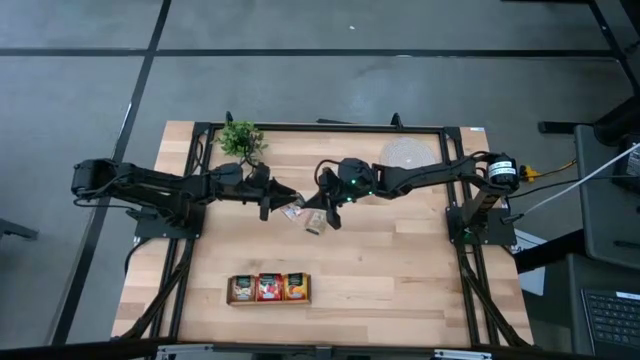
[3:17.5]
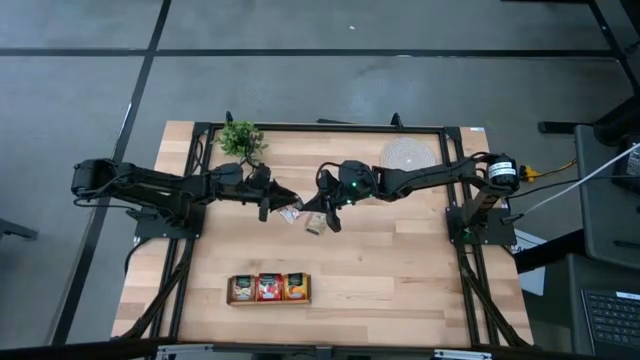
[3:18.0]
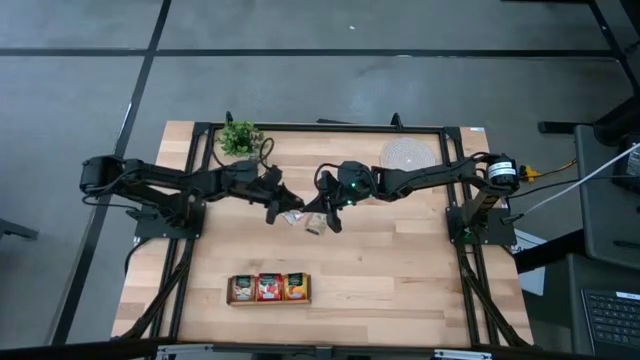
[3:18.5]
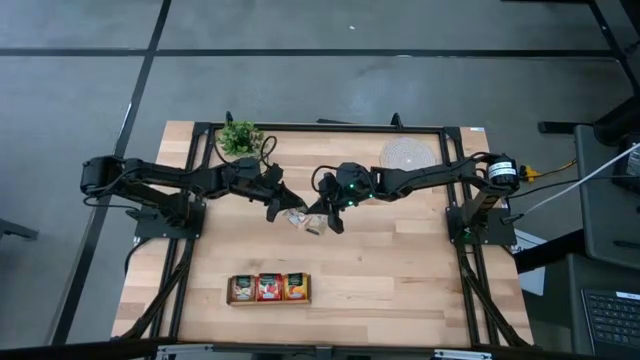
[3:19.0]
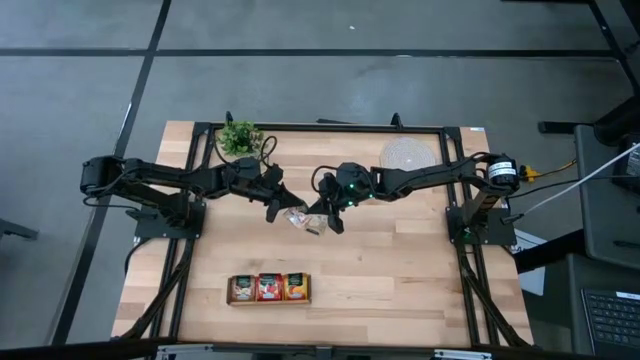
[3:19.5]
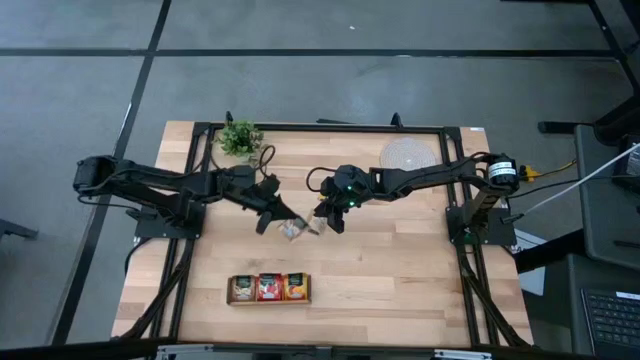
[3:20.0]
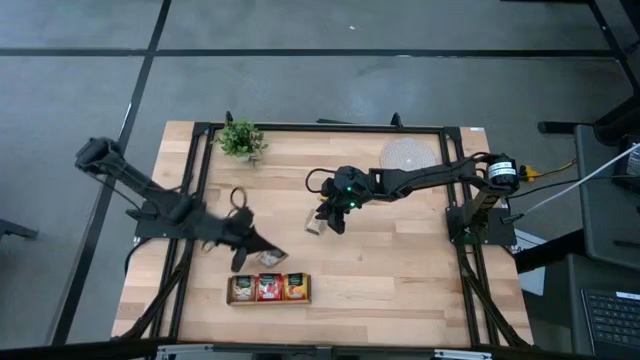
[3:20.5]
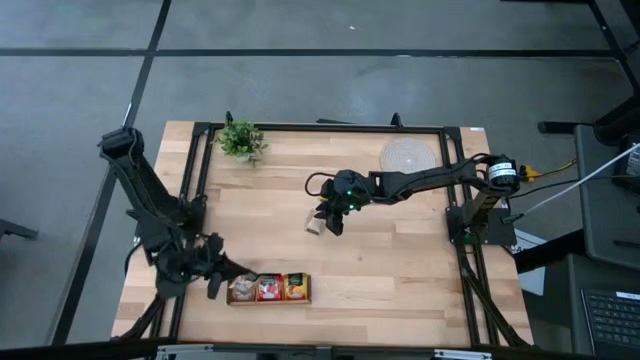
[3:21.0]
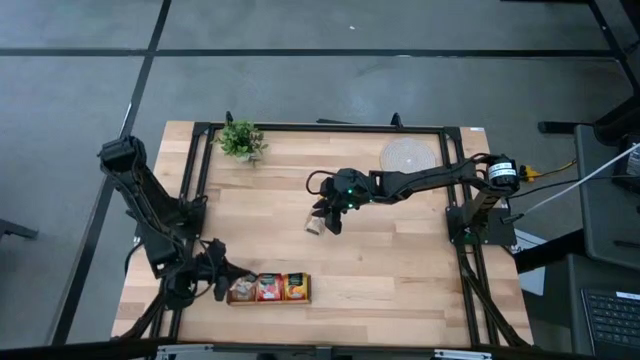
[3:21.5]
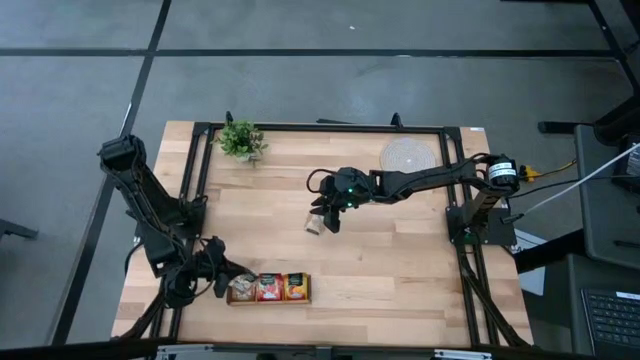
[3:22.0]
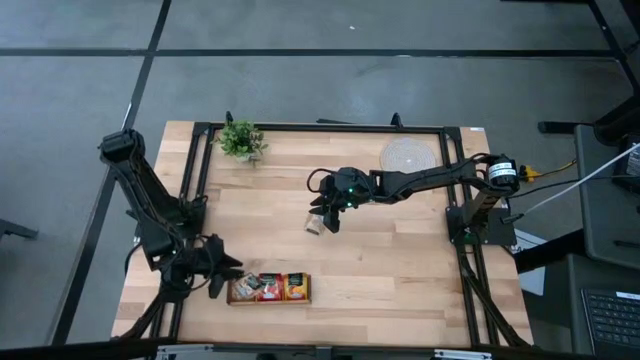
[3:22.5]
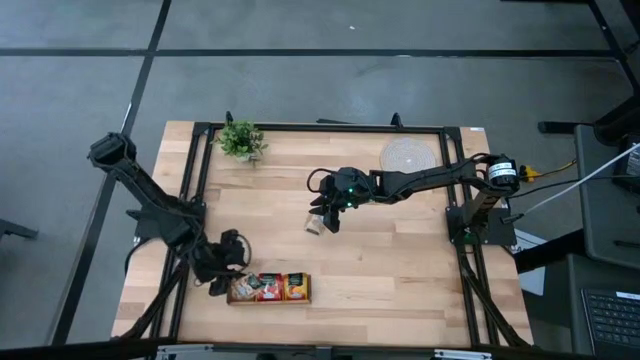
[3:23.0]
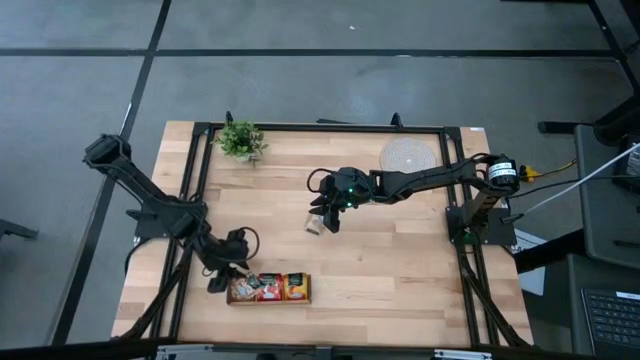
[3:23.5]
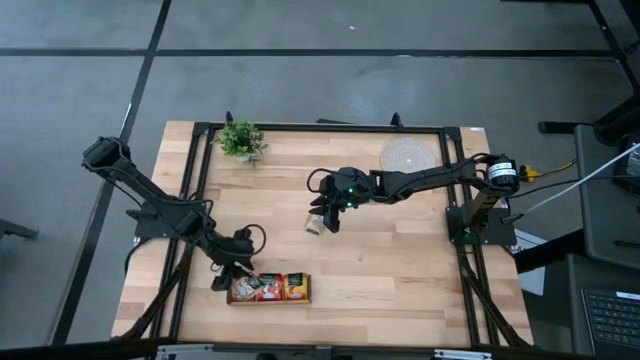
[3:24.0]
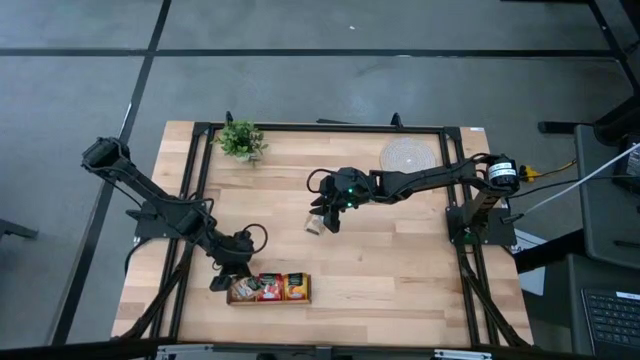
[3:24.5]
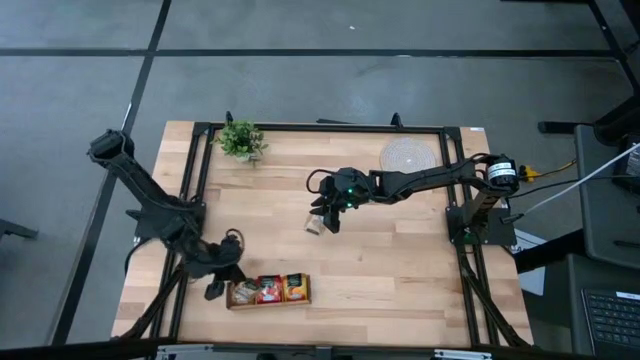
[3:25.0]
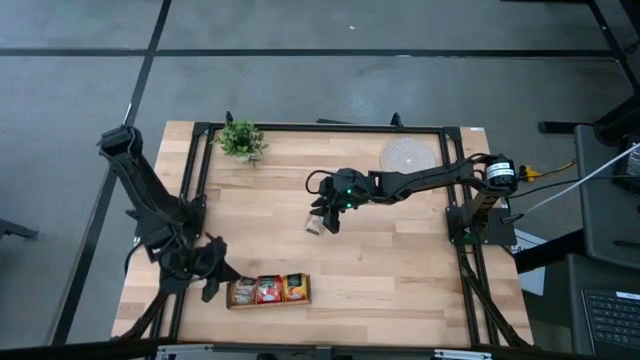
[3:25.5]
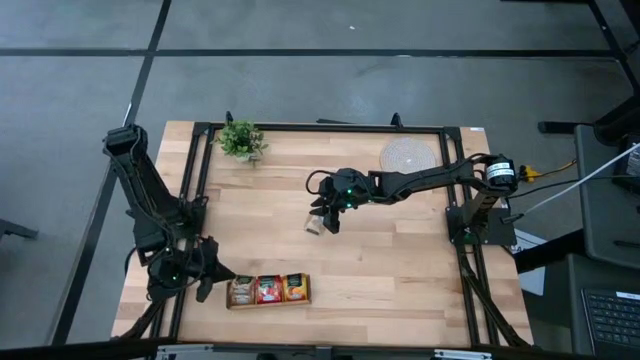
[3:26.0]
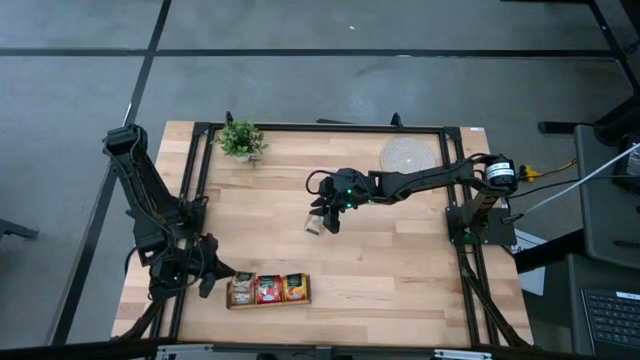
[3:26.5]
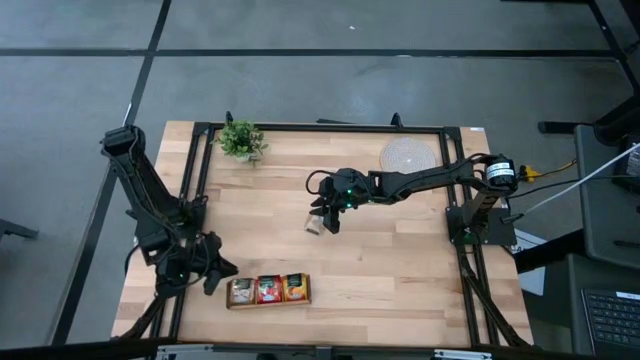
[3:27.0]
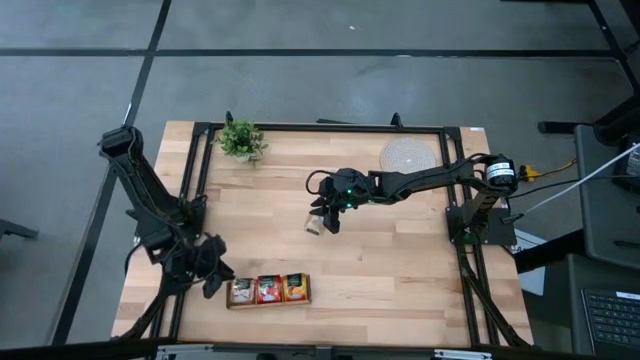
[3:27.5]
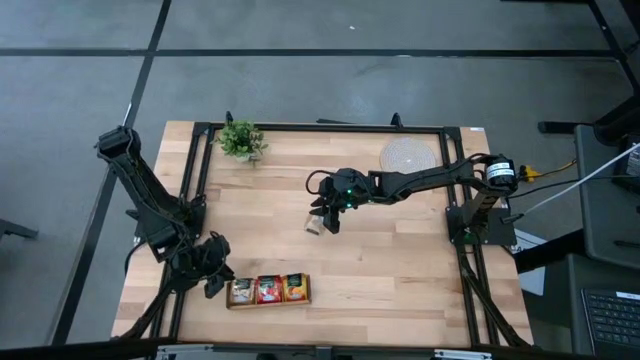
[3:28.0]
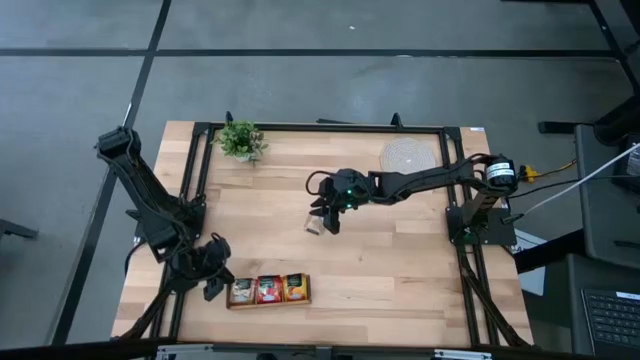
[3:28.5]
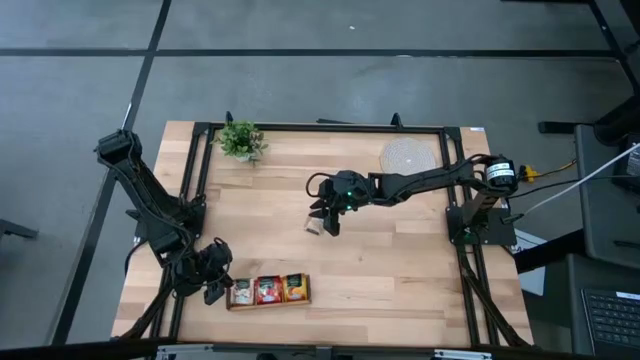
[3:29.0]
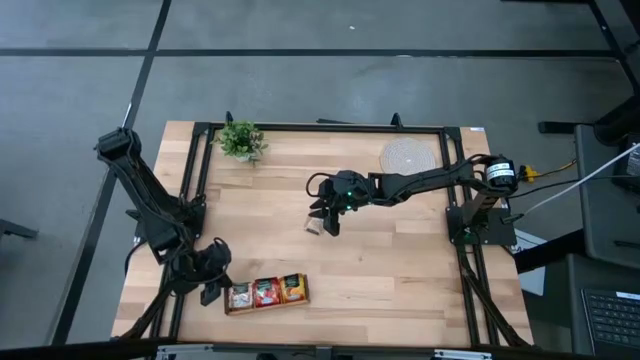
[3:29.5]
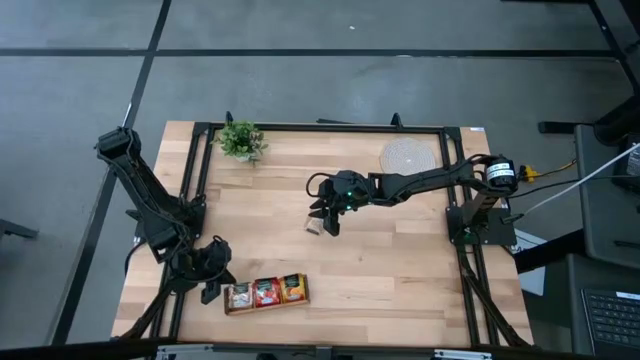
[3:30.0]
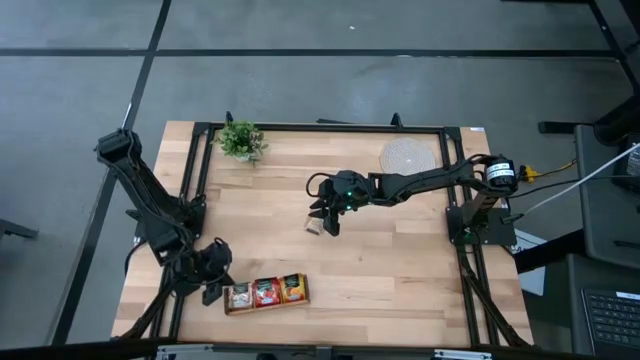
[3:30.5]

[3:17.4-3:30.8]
Task: Pick & Place Tea
Put the brown tea bag into the left section of the wooden organizer

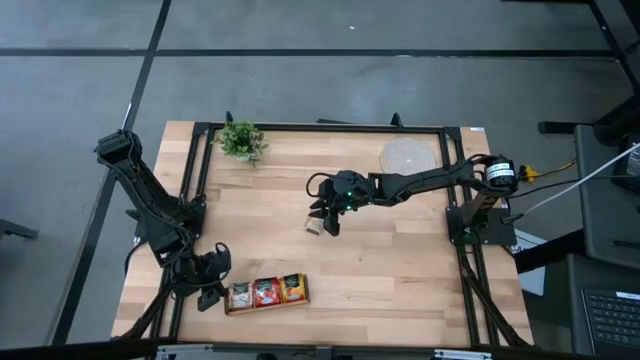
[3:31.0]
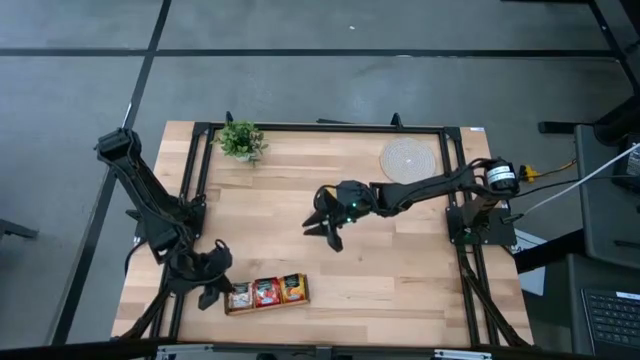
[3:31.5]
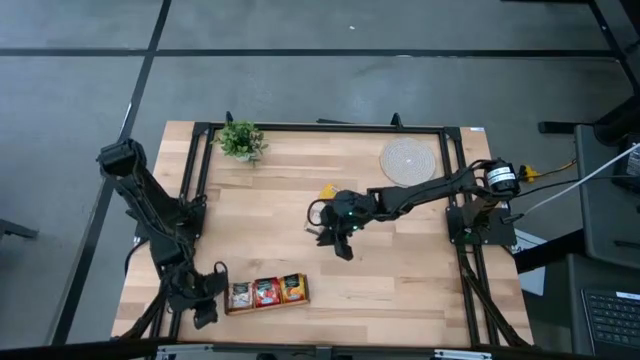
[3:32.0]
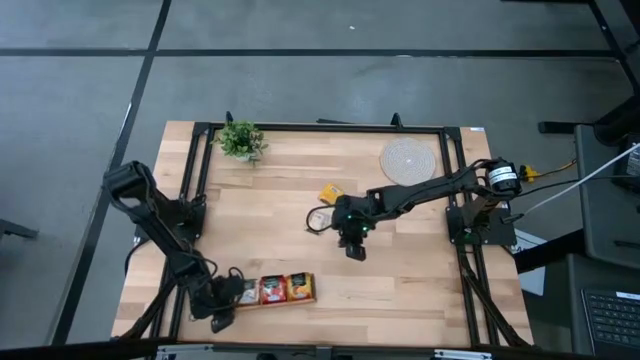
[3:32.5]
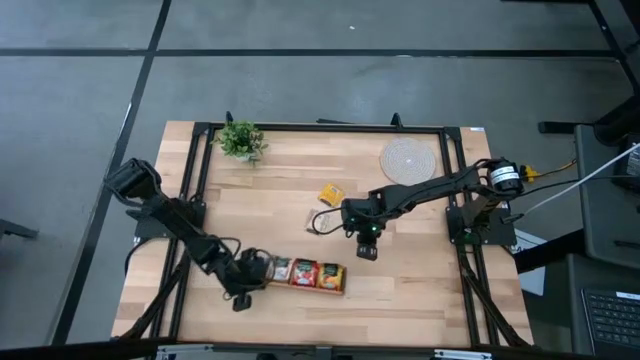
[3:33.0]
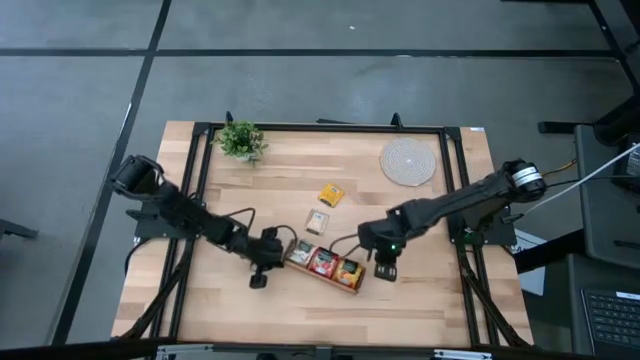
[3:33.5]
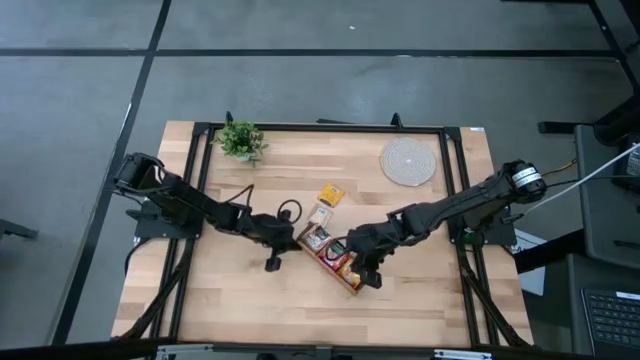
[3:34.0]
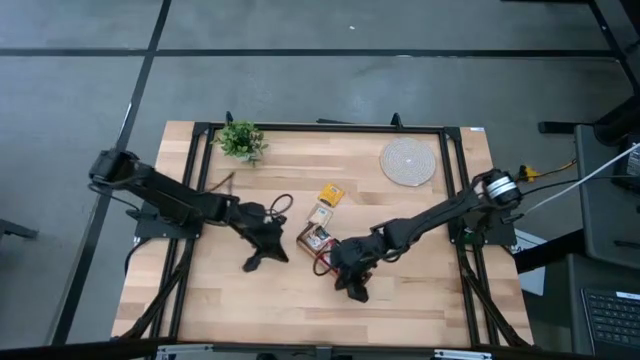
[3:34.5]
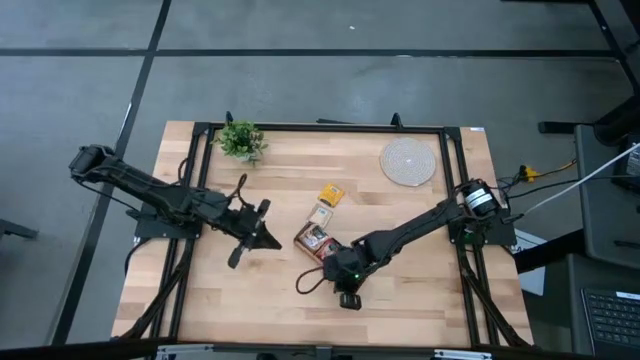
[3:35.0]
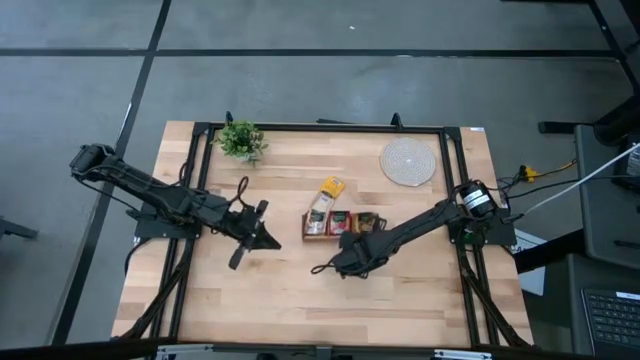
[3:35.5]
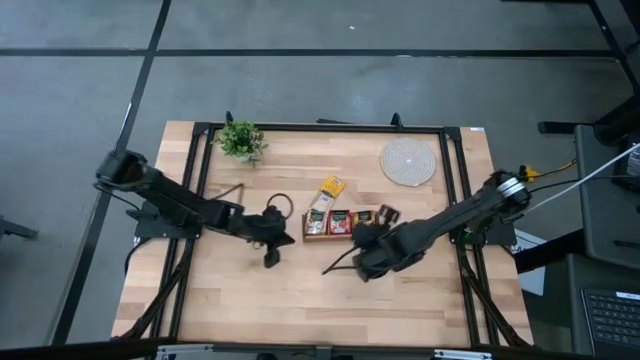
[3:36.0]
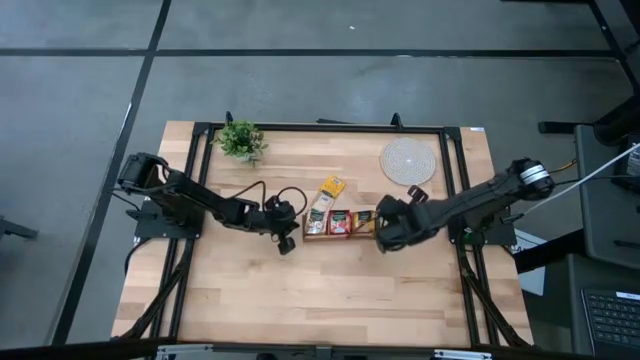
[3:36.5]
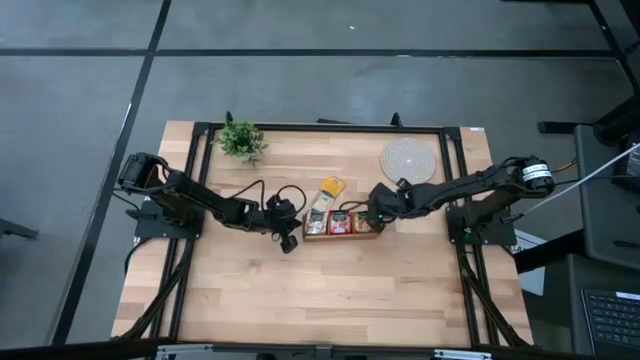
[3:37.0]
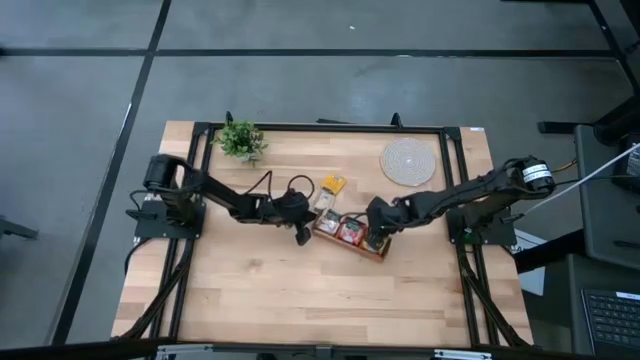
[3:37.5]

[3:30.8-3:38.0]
Move the wood organizer to the middle right of the table
